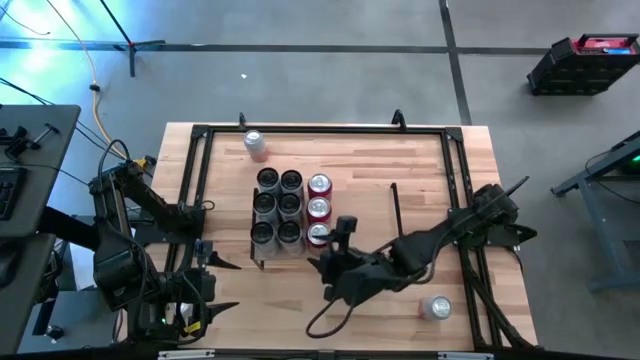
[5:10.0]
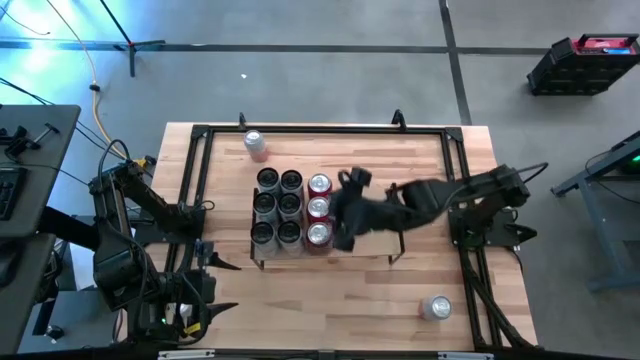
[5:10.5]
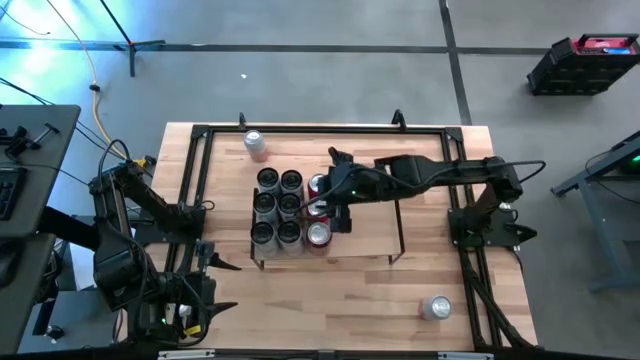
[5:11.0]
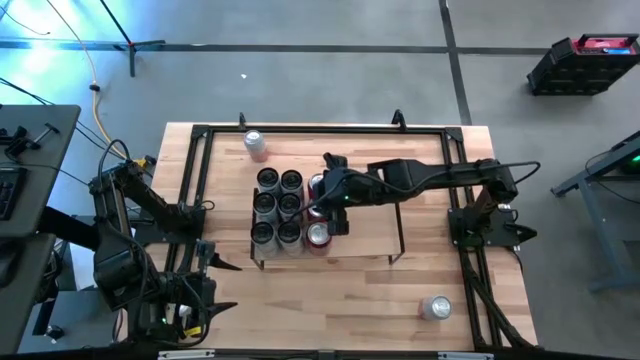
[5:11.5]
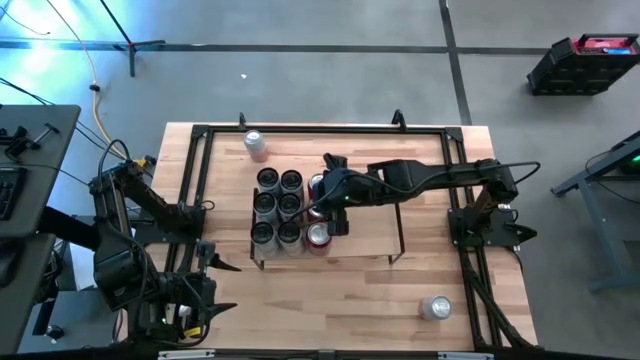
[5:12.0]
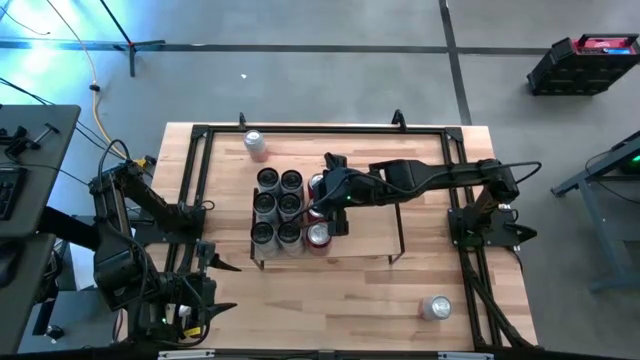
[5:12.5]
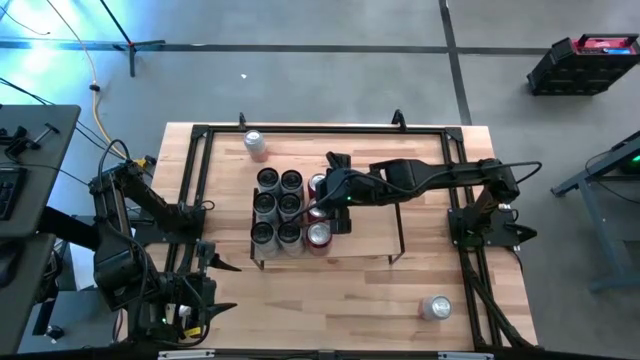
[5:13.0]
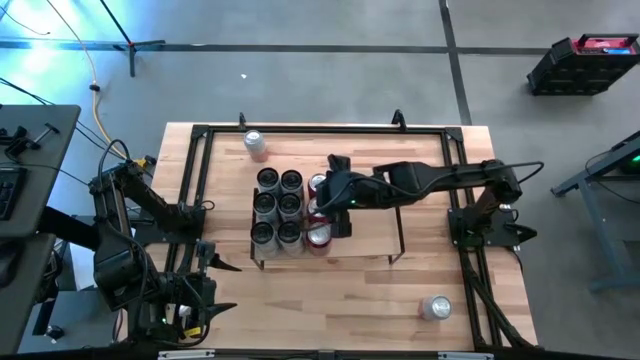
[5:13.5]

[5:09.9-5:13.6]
Task: Place canned beverage on shelf
Adjust the middle red soda can on the shelf

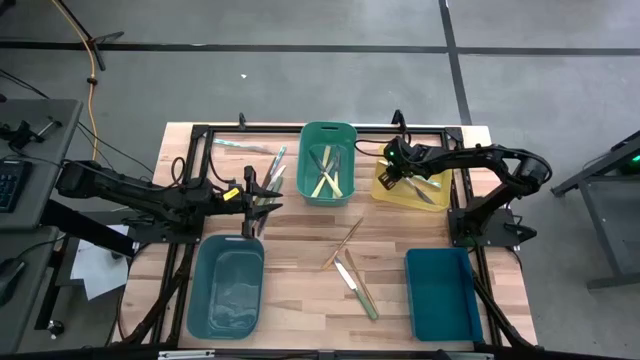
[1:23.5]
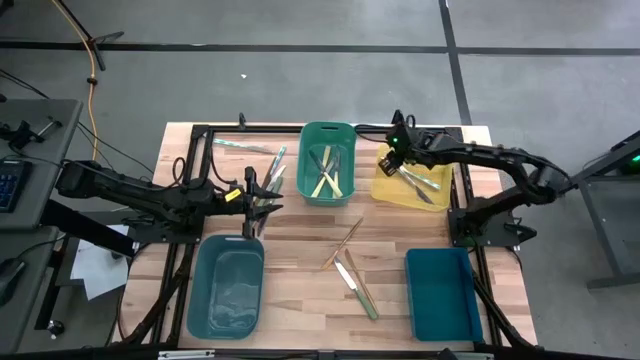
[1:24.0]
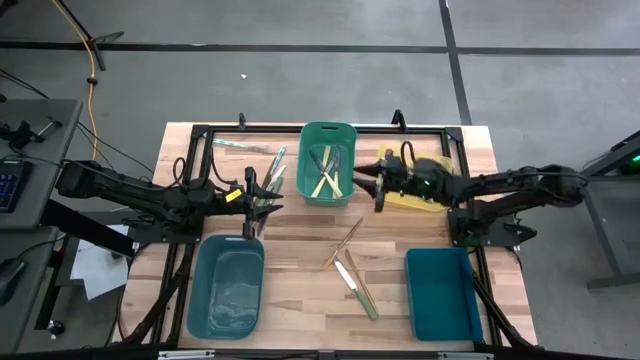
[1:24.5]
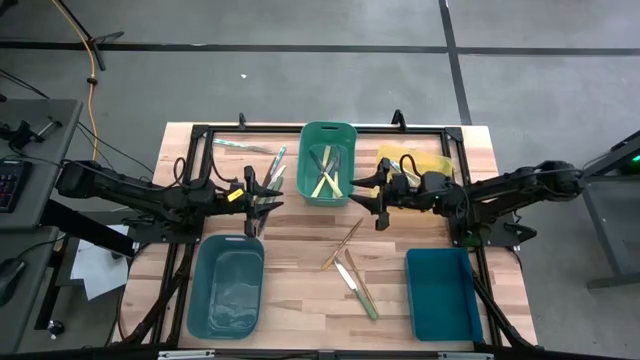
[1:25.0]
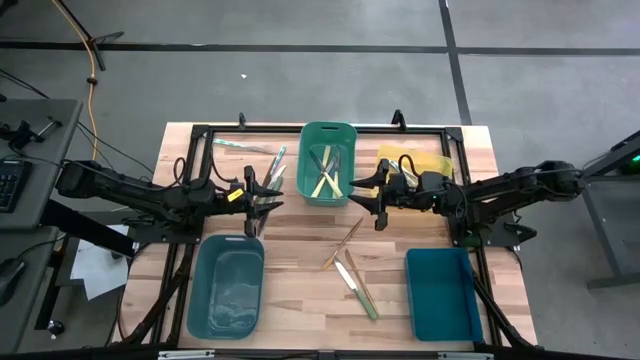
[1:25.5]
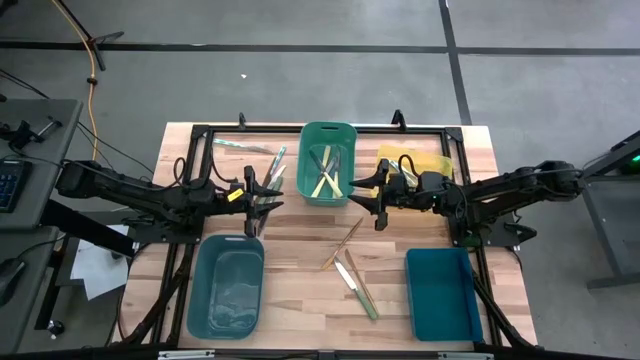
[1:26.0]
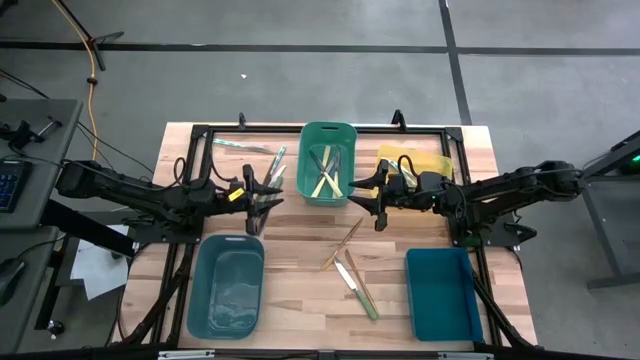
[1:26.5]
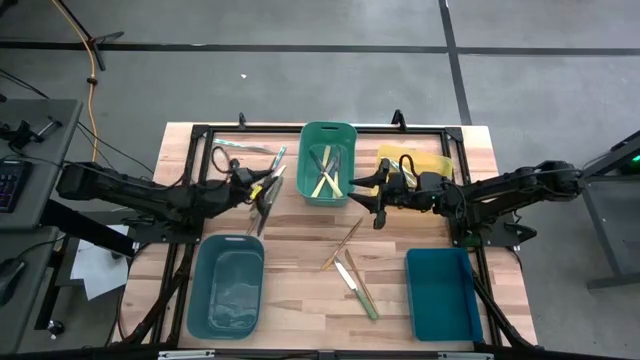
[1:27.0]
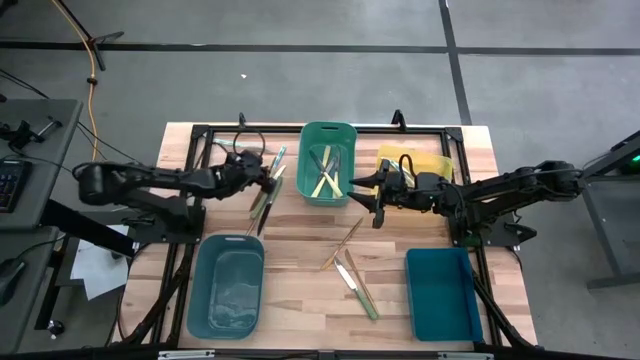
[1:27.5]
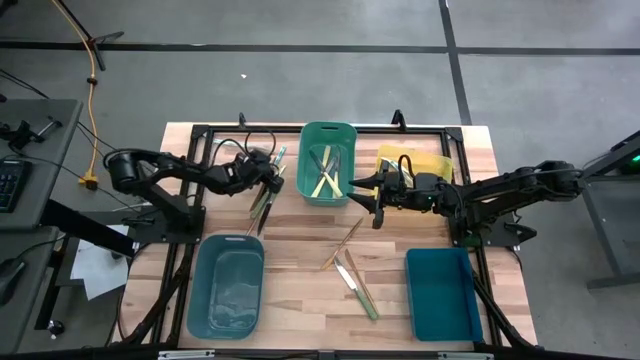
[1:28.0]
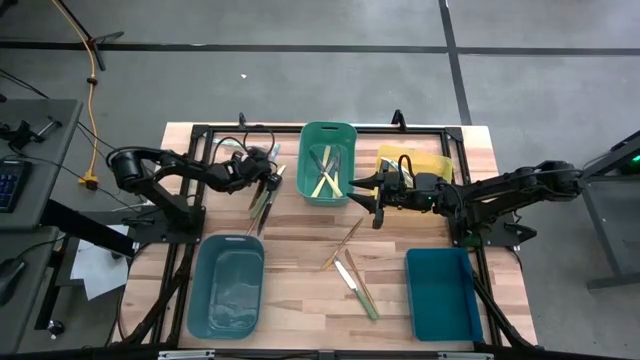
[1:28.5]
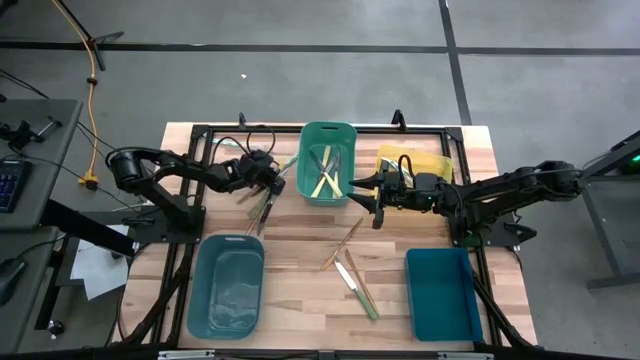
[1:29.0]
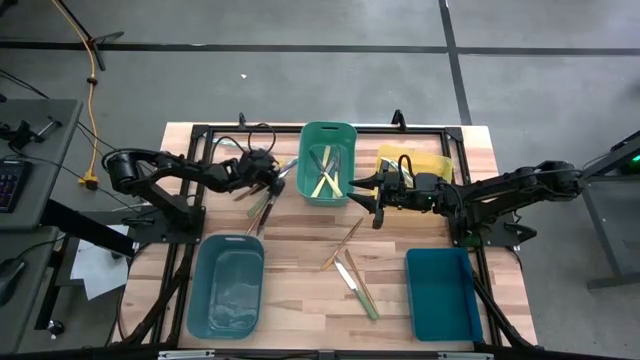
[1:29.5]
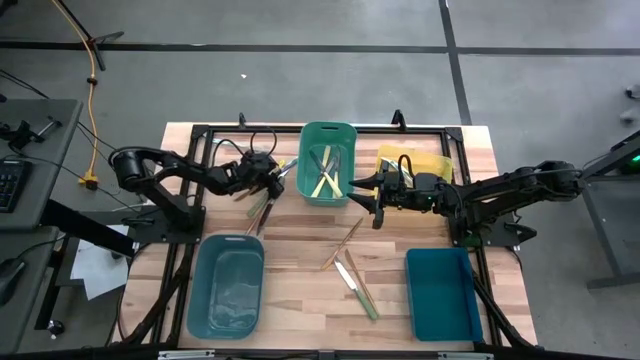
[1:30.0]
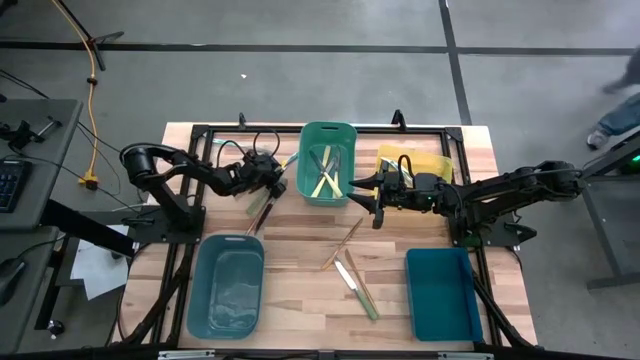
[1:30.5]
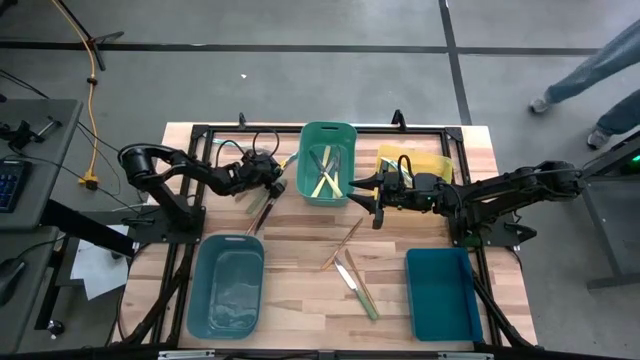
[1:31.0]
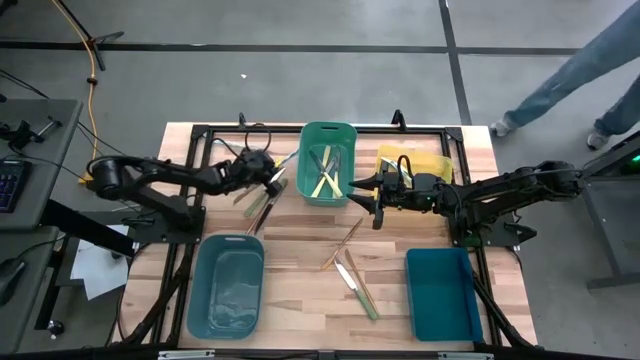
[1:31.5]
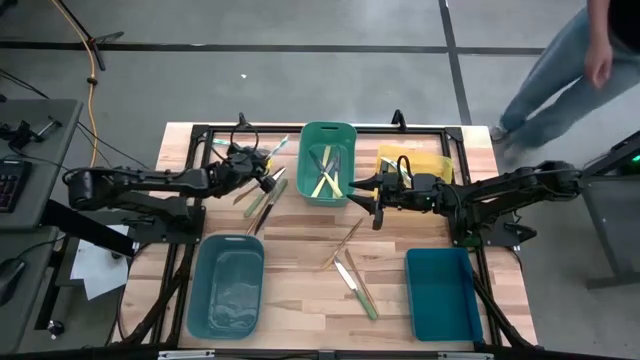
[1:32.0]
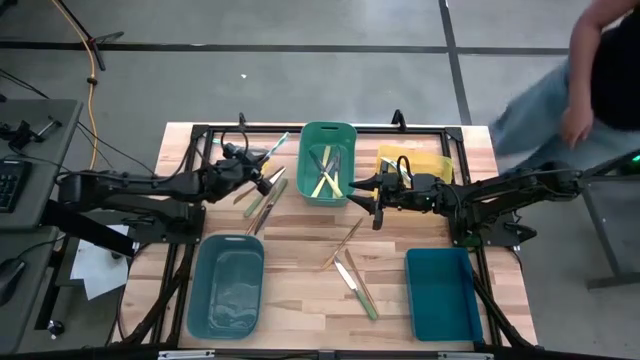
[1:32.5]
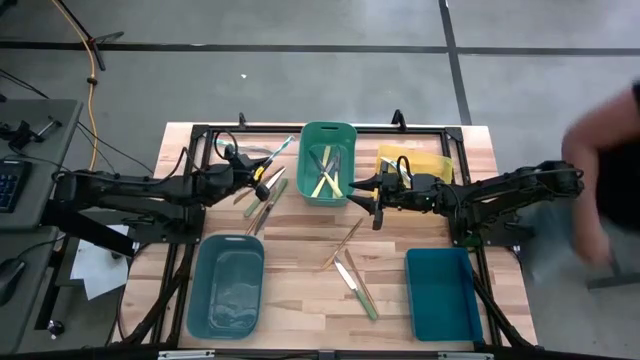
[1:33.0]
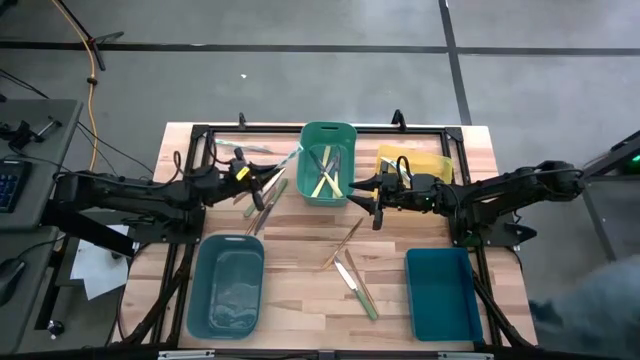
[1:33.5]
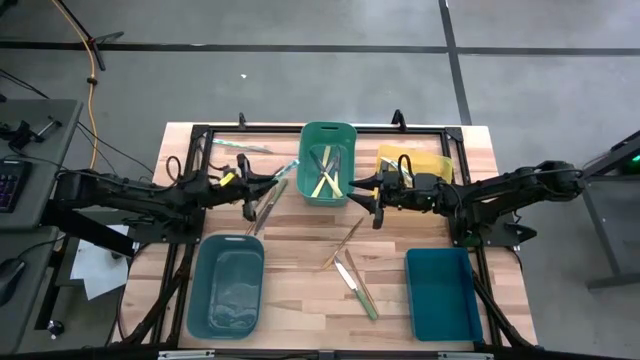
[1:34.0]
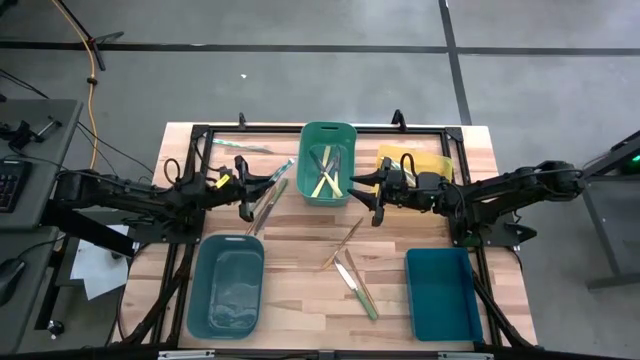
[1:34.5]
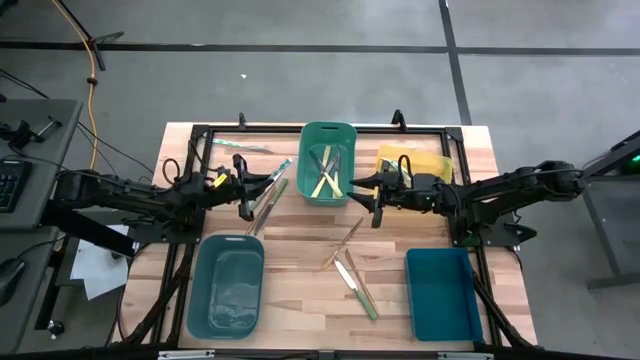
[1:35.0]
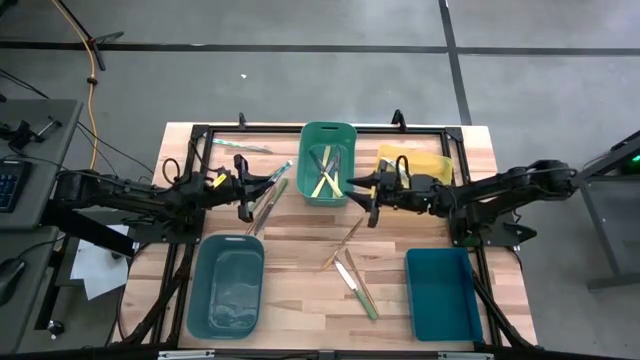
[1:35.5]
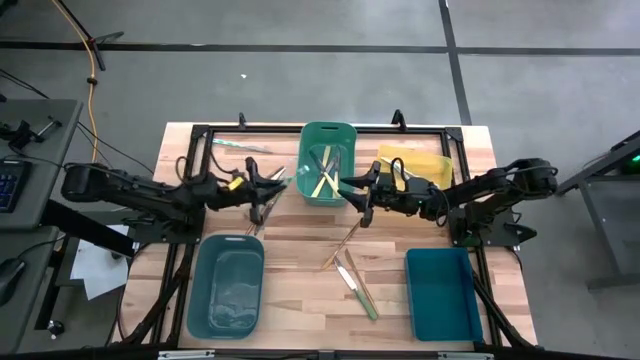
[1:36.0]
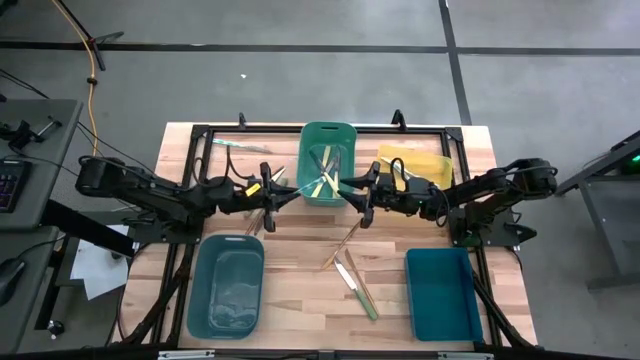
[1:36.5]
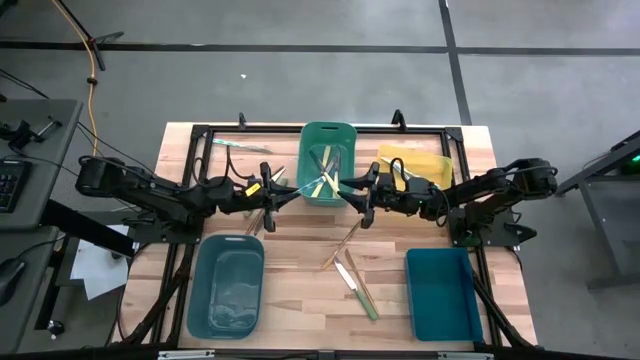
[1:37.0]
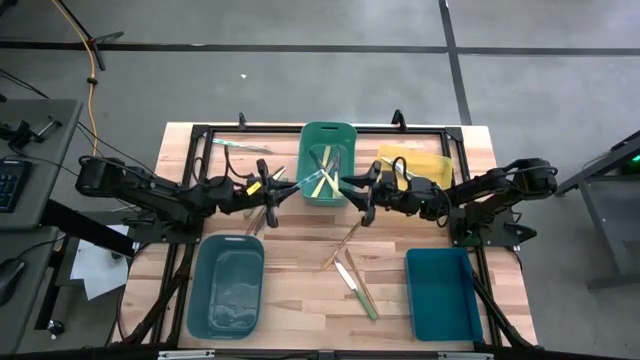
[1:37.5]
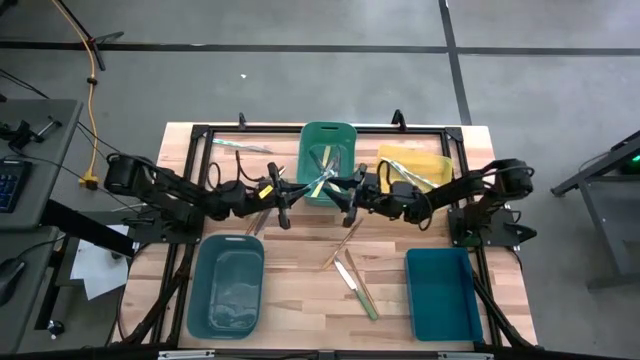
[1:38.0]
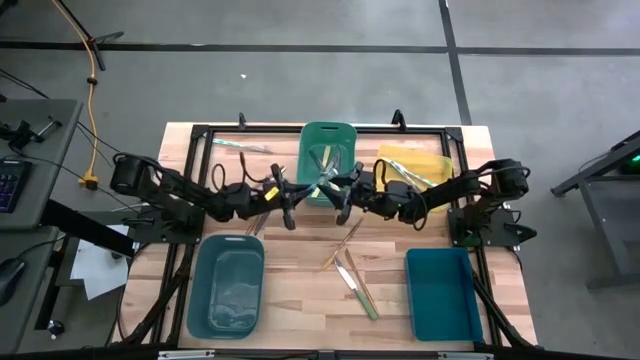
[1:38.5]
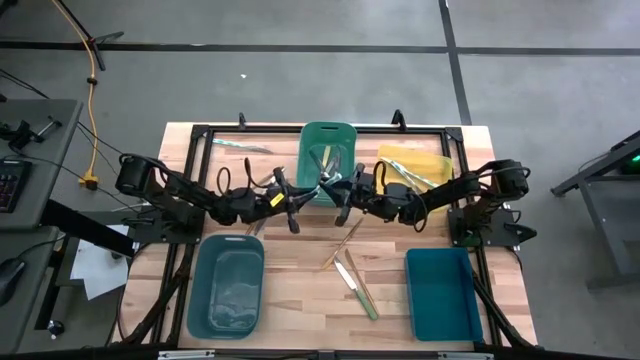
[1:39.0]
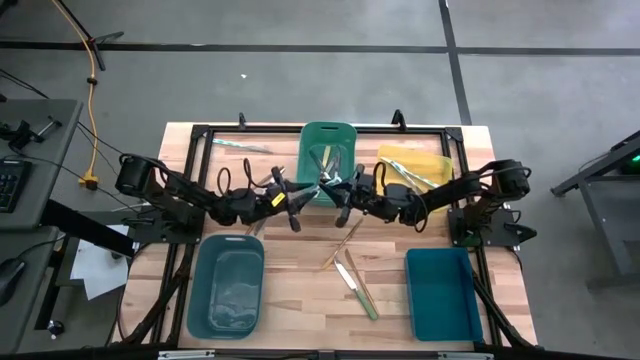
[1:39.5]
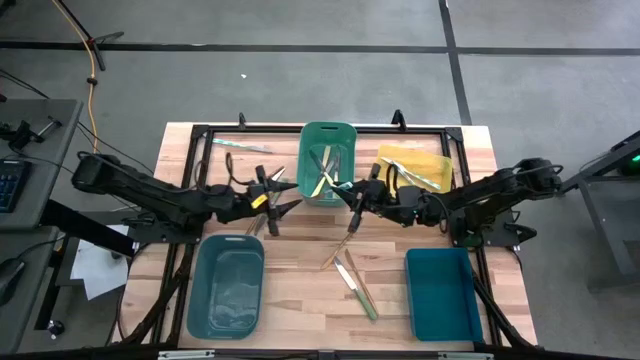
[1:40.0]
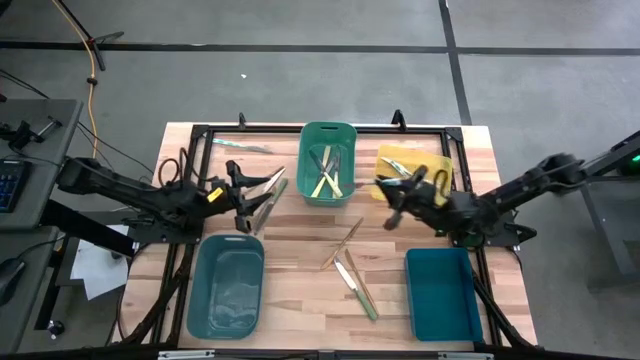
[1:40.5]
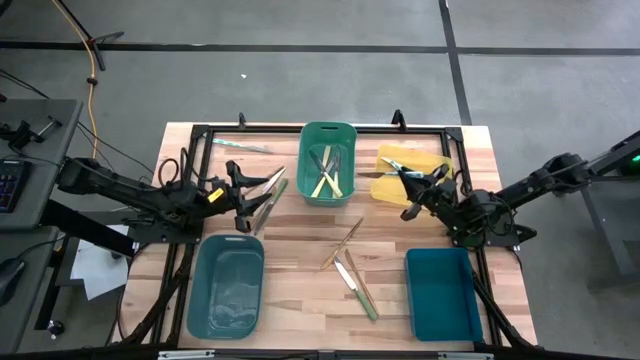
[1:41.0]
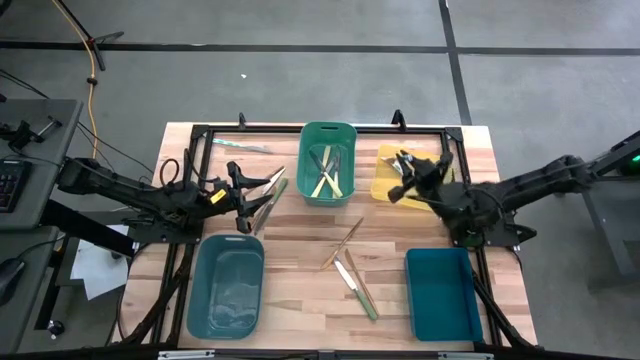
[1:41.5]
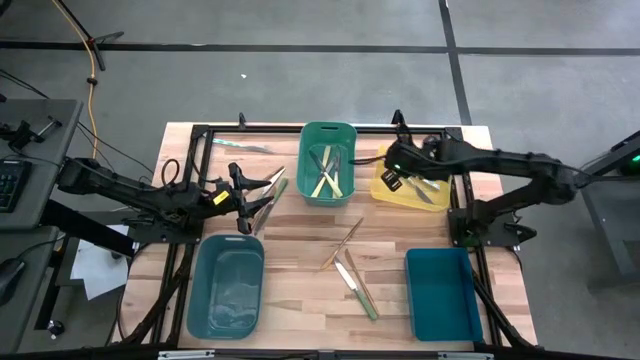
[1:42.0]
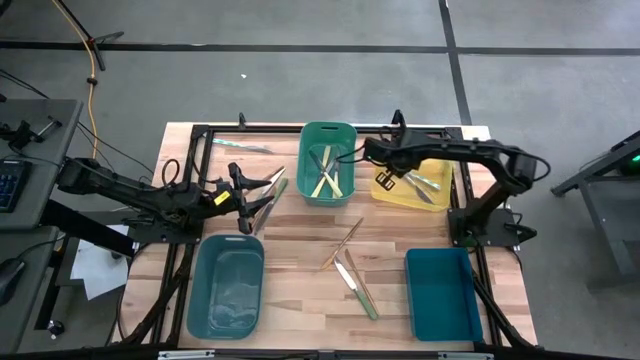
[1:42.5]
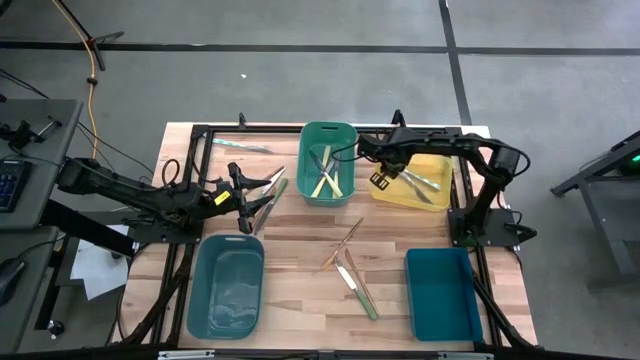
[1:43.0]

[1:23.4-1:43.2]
Task: Sort silverware by color (type)
Put the blue patterned knife into the yellow bin
